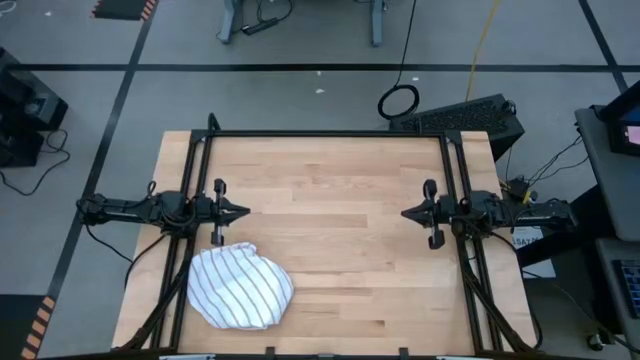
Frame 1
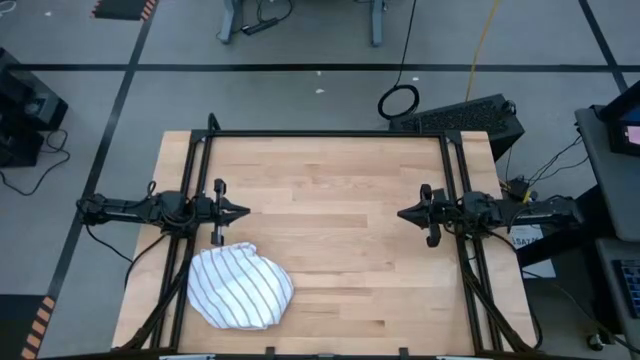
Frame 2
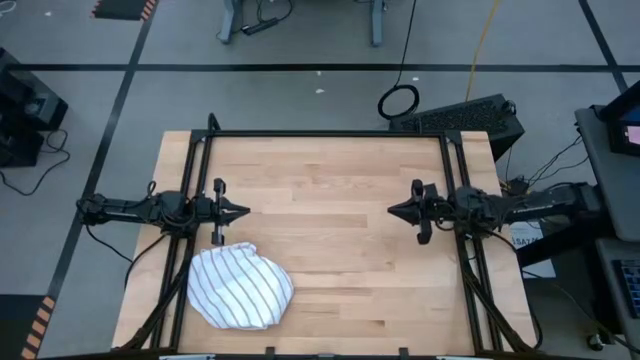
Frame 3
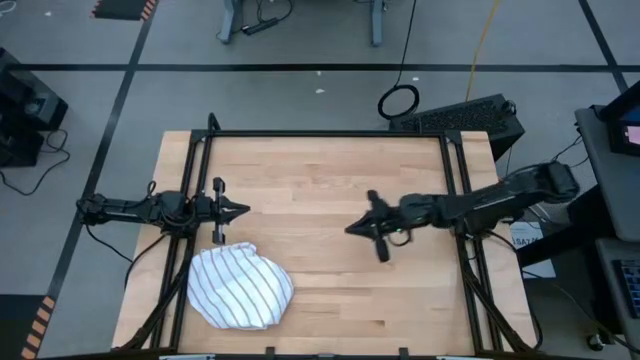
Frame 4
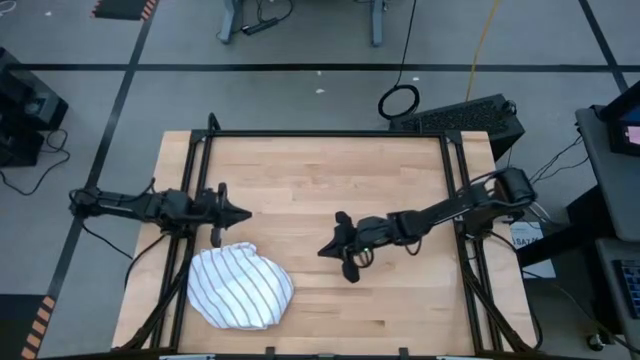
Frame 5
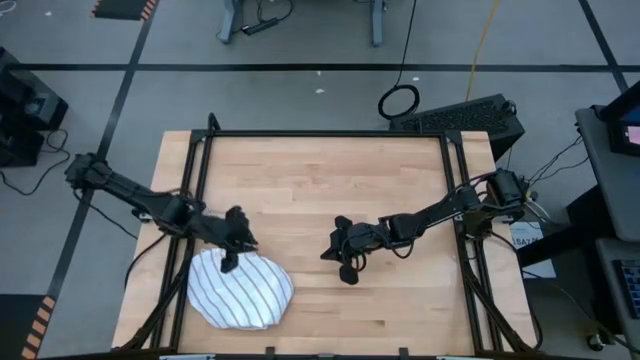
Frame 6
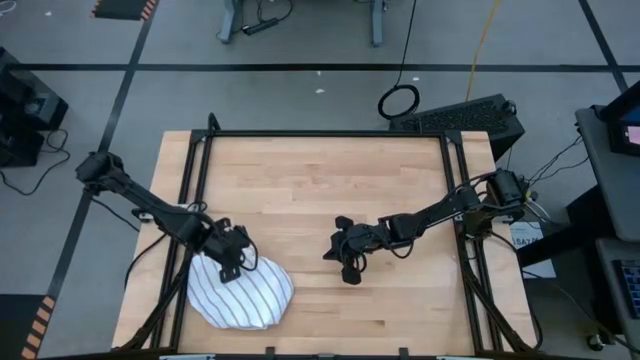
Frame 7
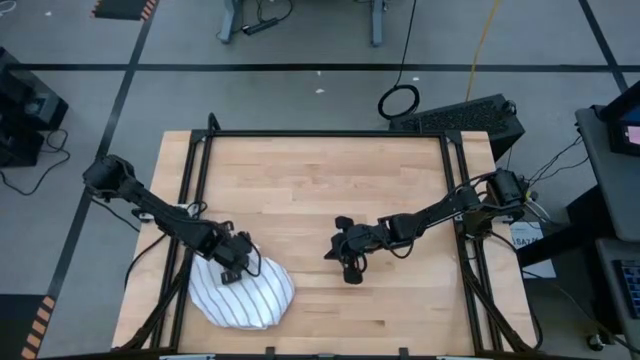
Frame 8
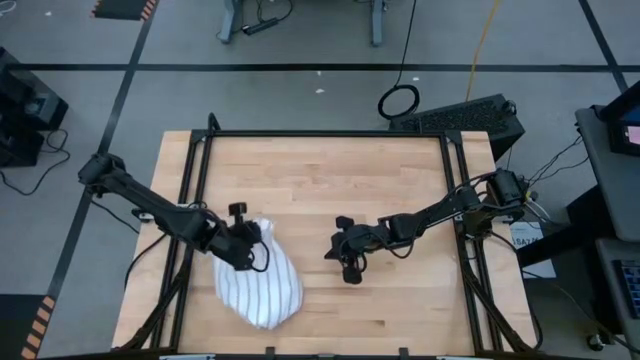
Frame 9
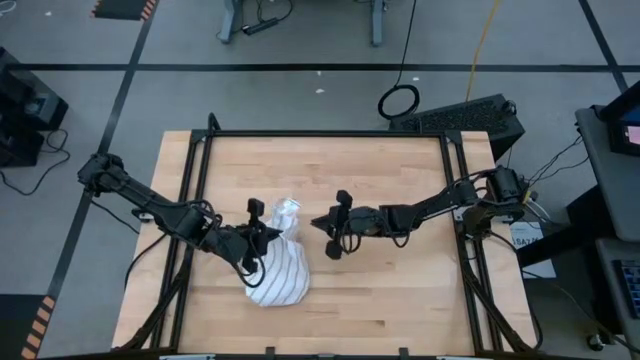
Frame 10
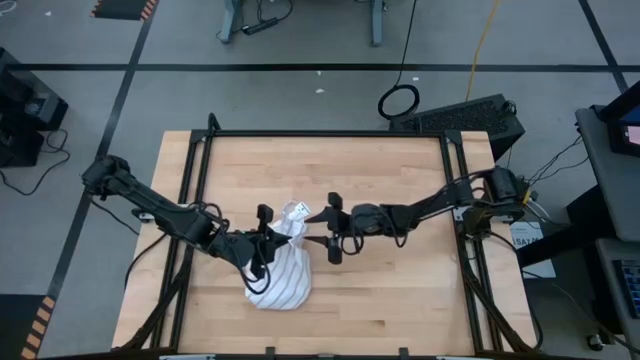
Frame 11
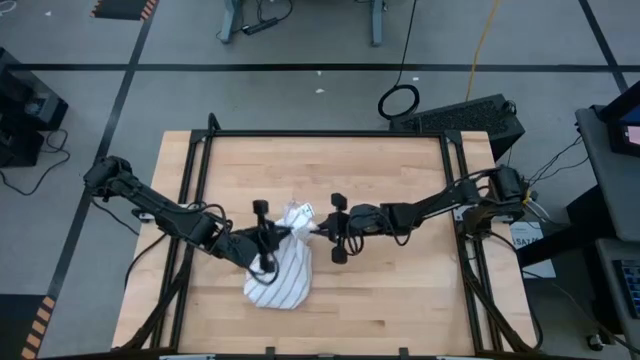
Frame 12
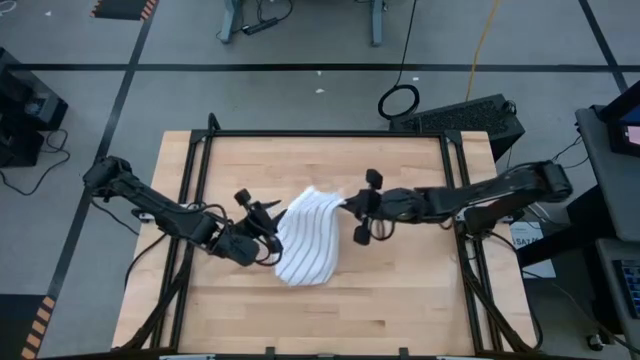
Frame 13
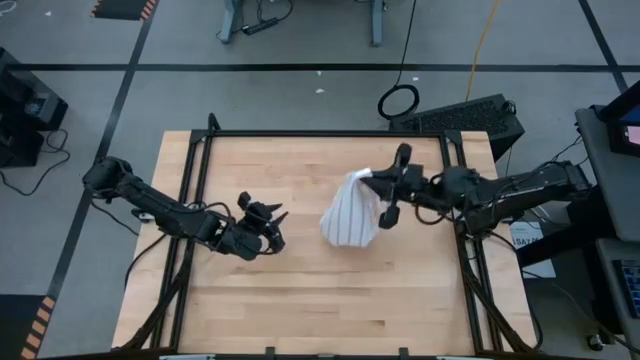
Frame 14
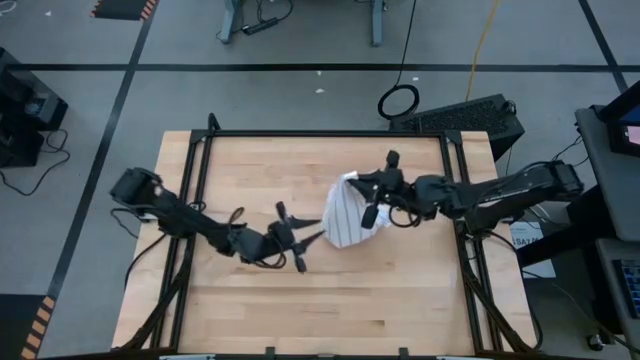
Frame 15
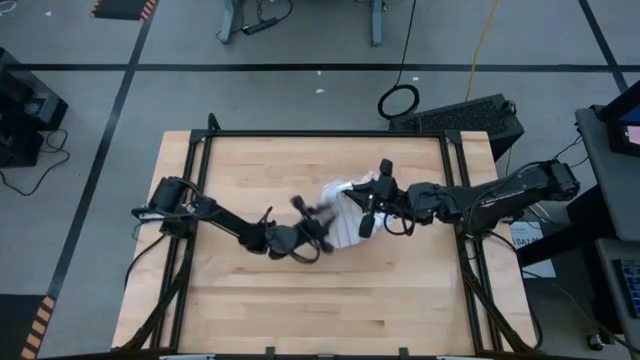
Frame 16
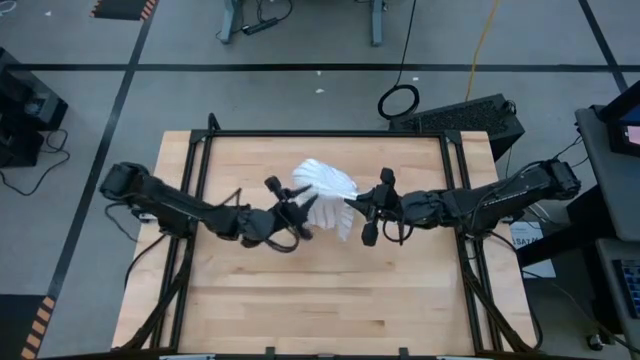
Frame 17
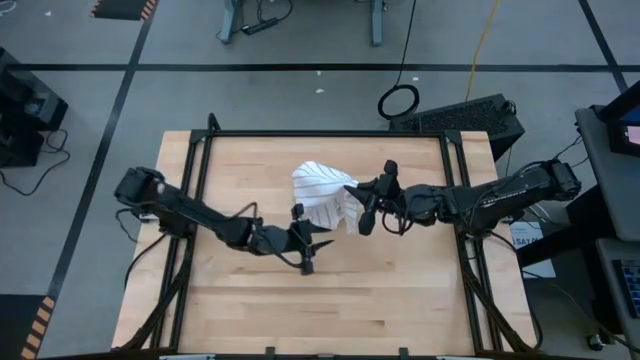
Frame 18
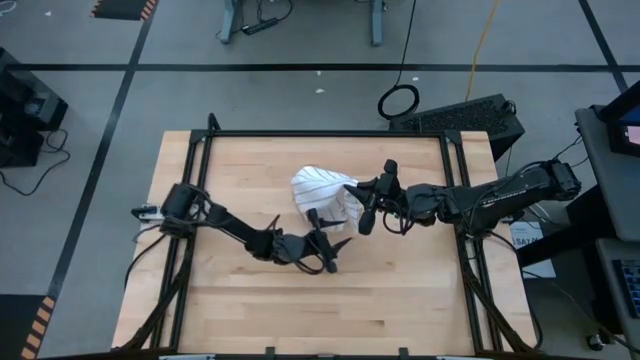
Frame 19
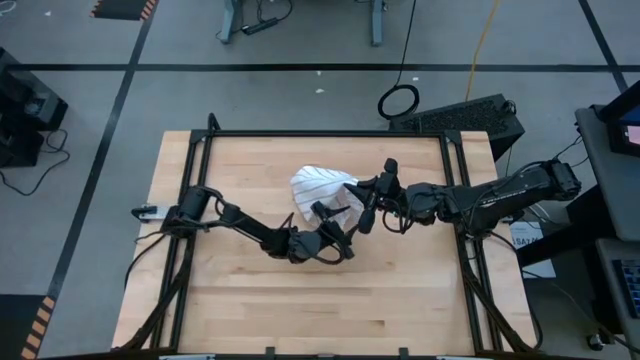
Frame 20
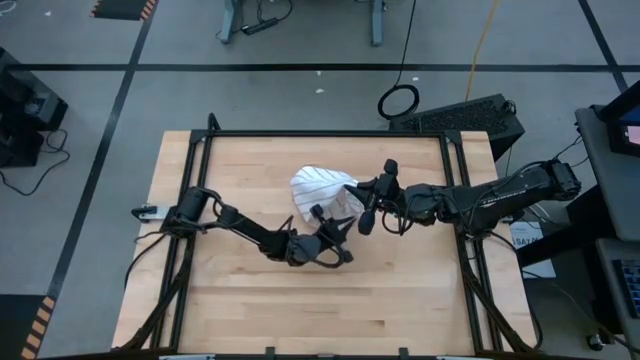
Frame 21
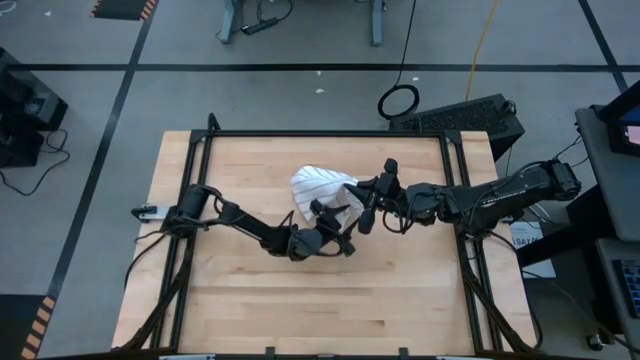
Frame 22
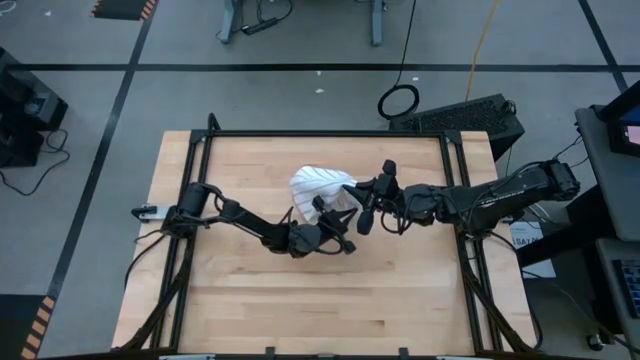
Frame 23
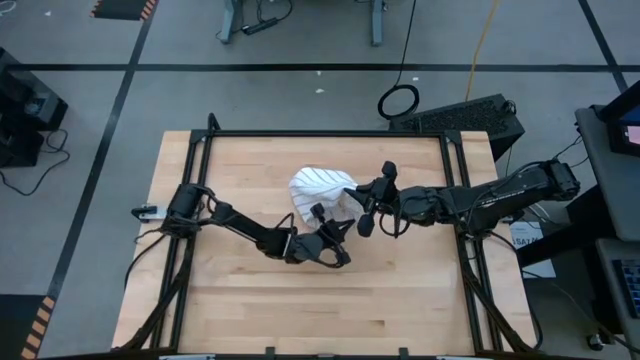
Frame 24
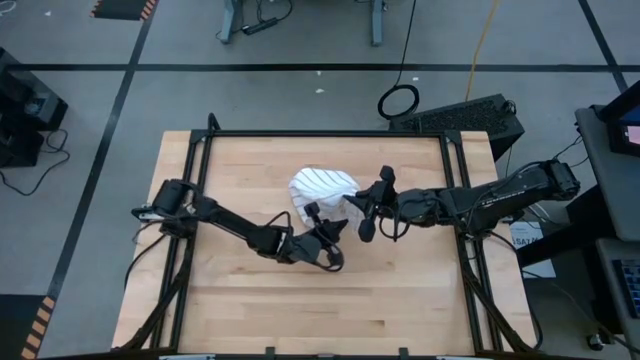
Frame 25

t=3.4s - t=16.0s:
Task: Roll towel into tight, uniform cylinder
Fold the white brown kitchen towel

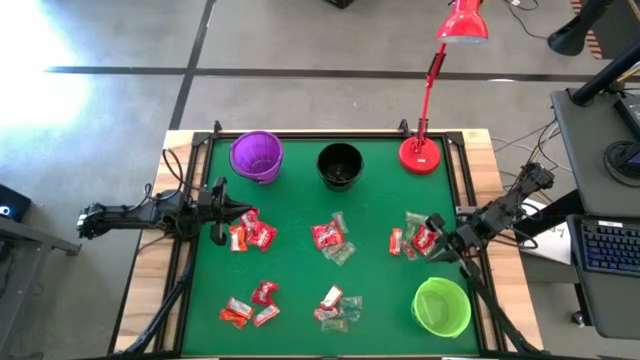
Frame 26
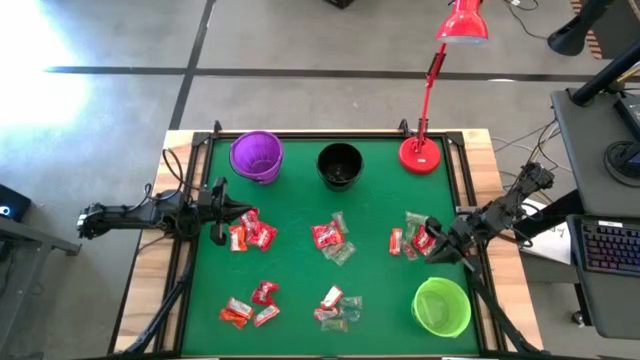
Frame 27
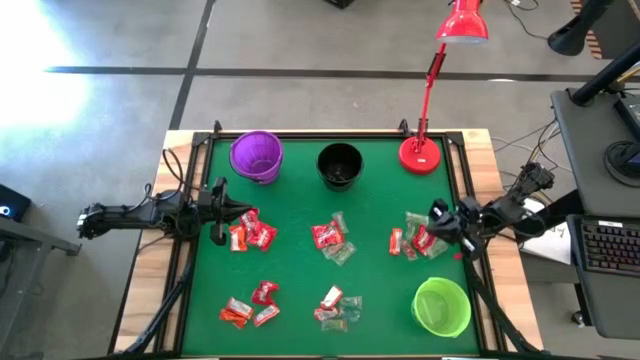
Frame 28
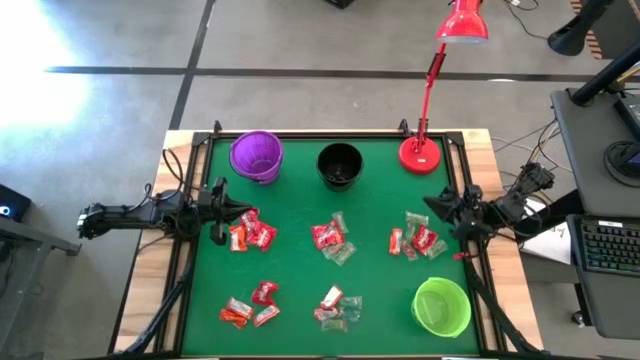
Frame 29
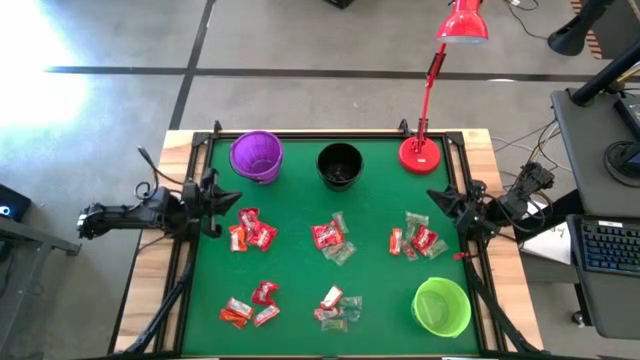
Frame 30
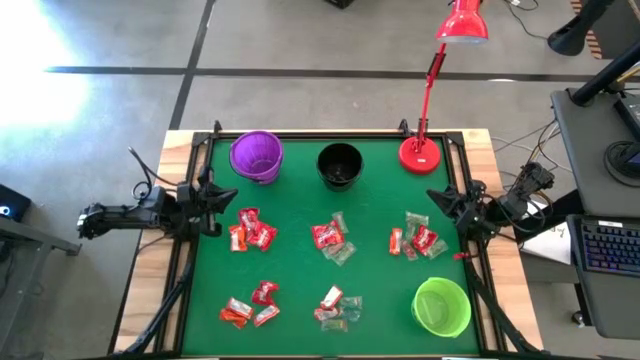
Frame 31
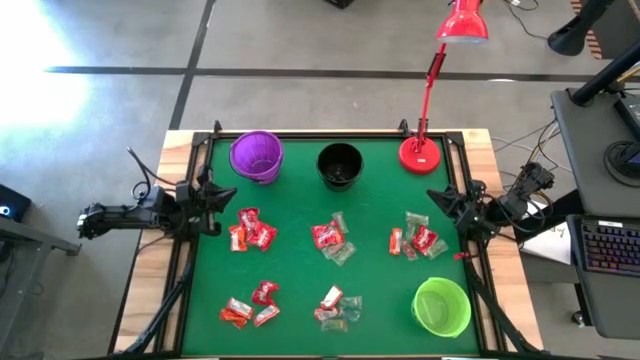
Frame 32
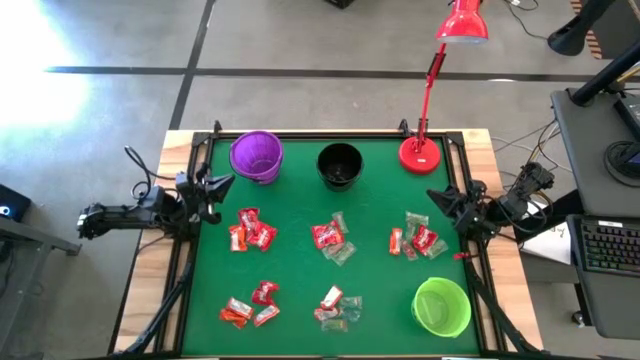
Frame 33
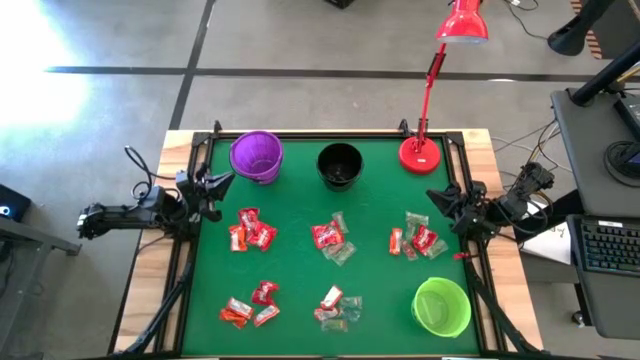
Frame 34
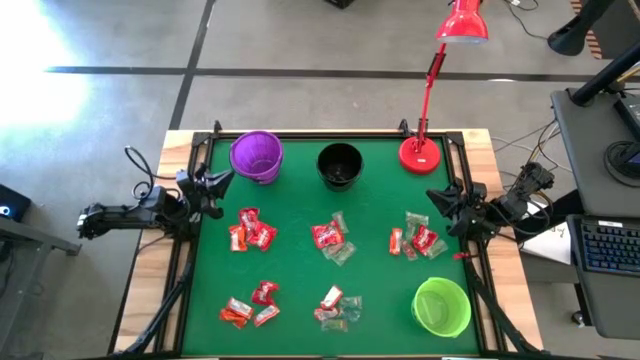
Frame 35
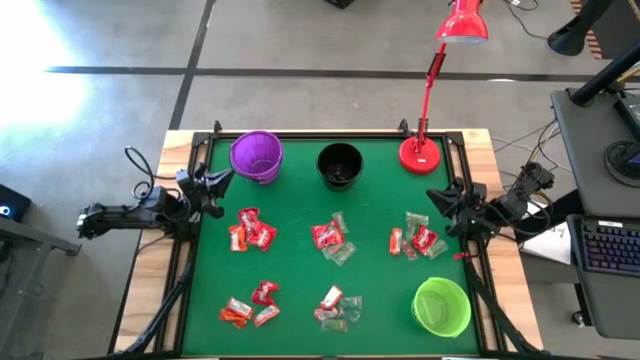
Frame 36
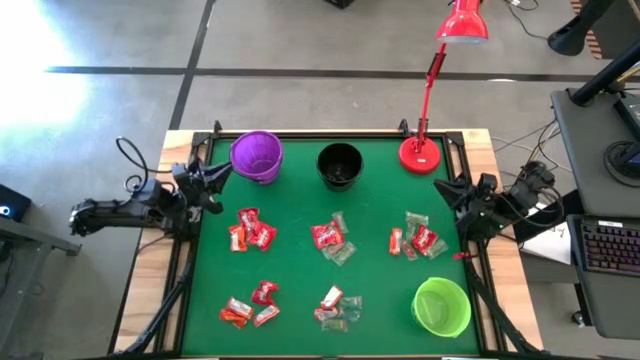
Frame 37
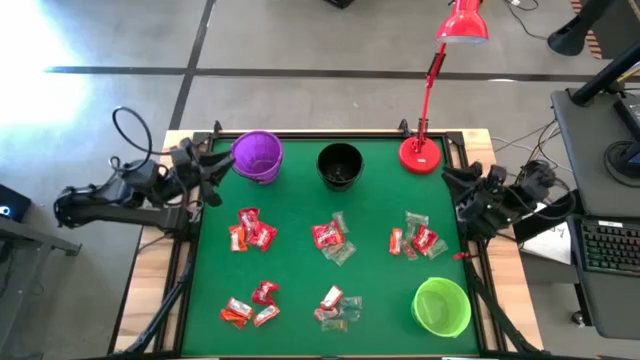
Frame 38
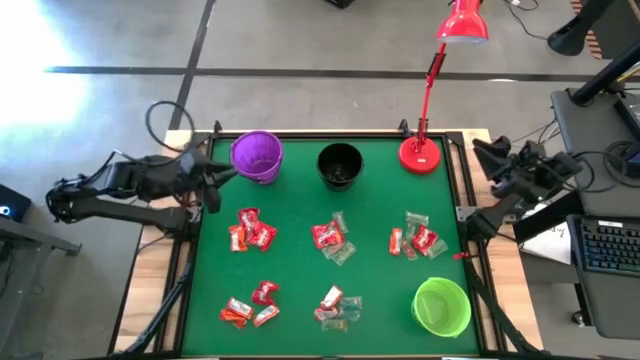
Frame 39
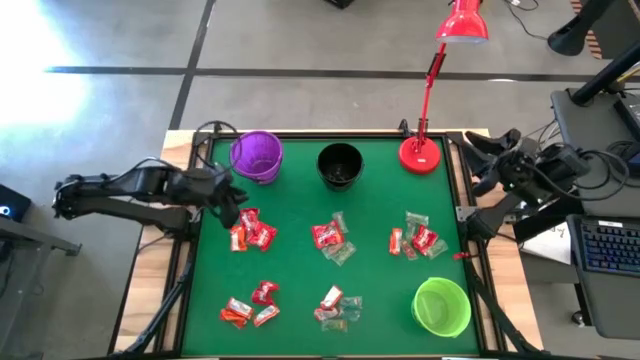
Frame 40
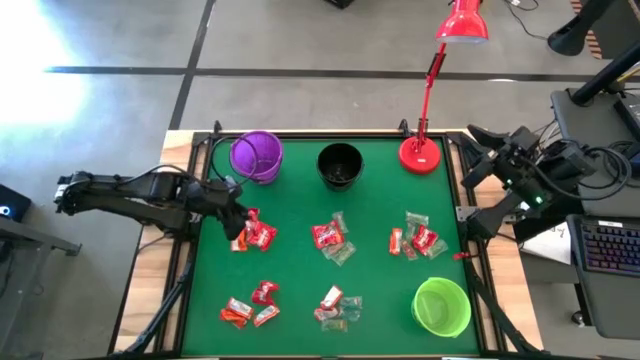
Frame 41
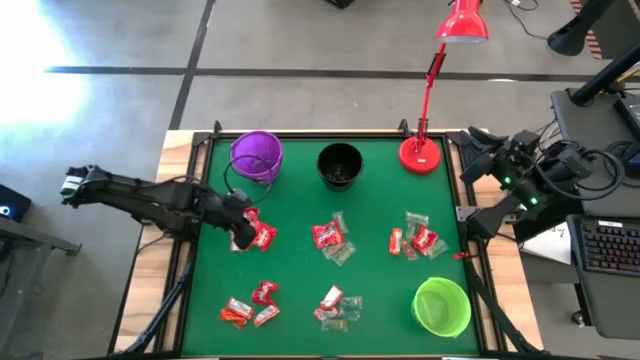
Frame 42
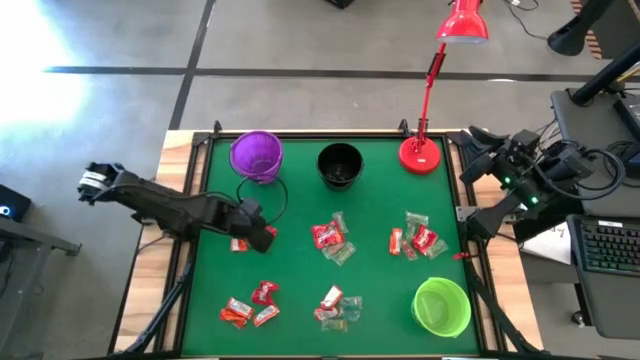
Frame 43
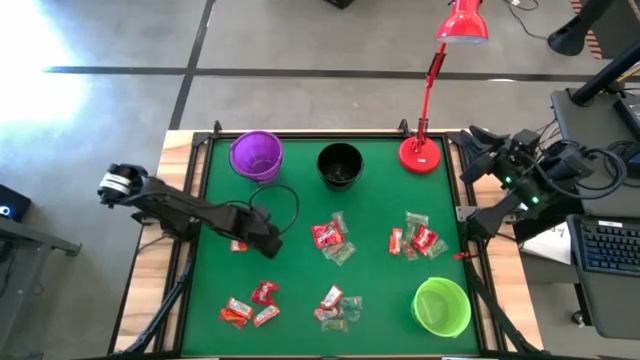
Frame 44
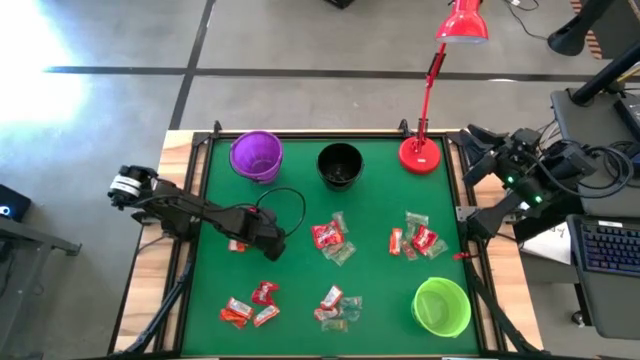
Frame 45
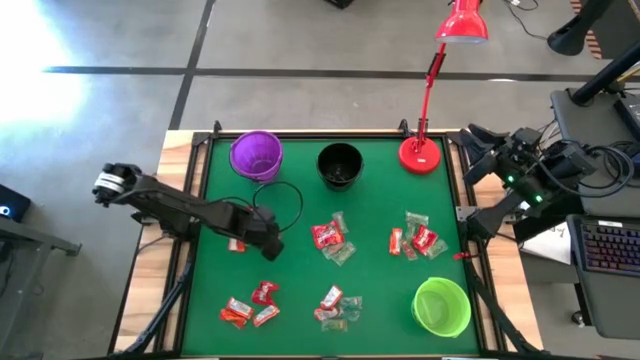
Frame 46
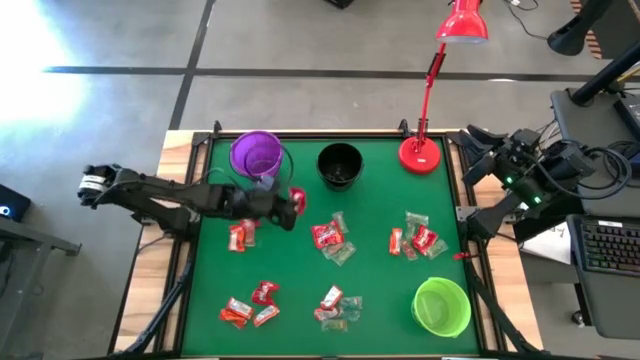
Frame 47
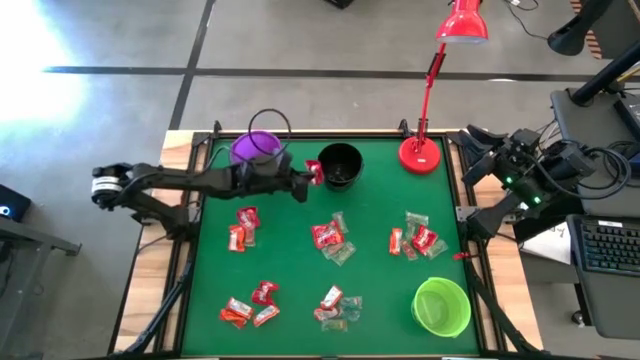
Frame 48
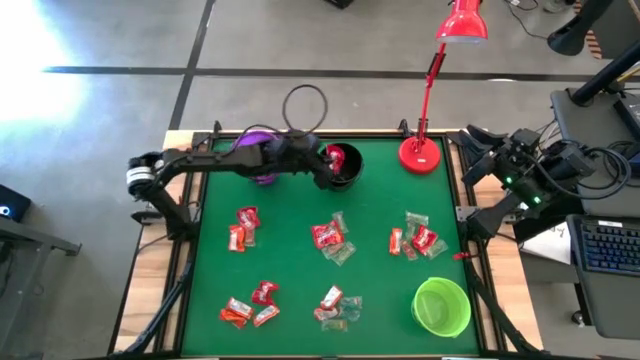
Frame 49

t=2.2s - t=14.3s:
Task: Sort candy
Put the red candy pack into the black bucket
